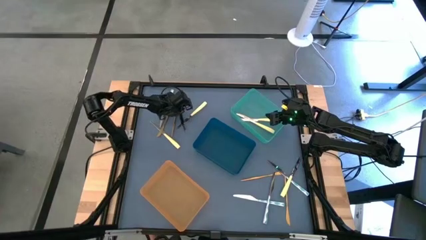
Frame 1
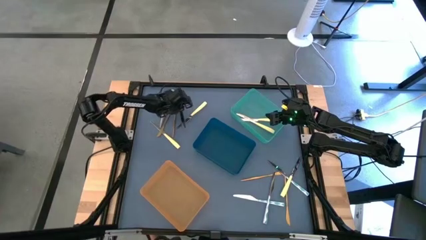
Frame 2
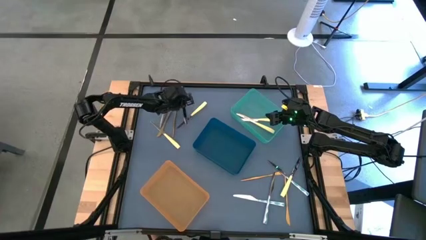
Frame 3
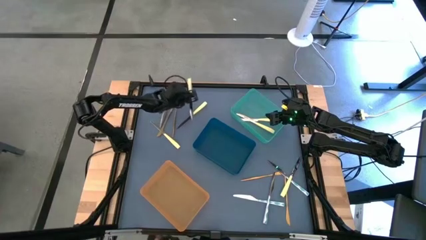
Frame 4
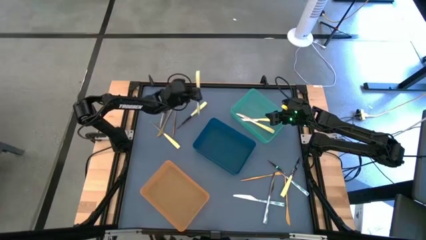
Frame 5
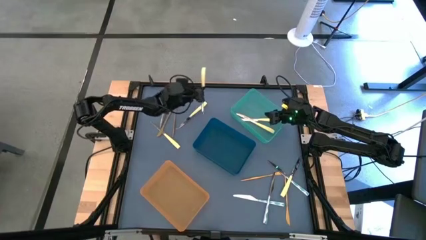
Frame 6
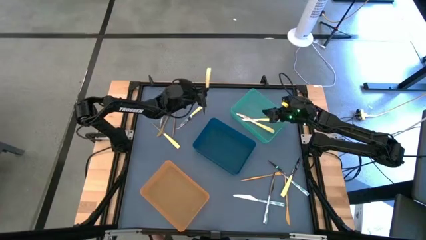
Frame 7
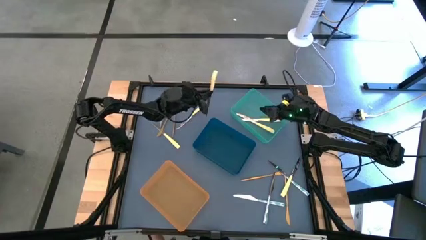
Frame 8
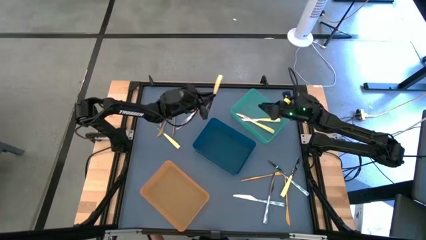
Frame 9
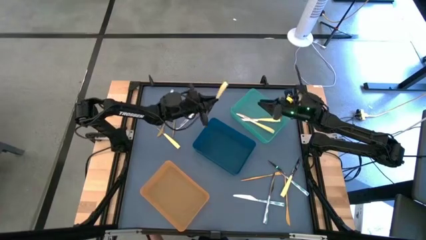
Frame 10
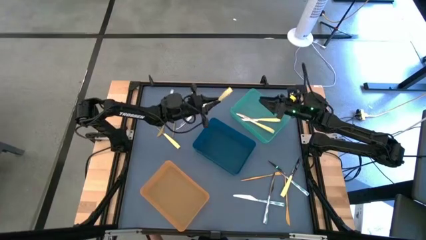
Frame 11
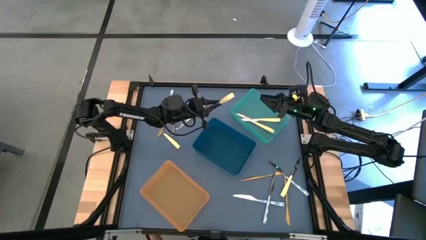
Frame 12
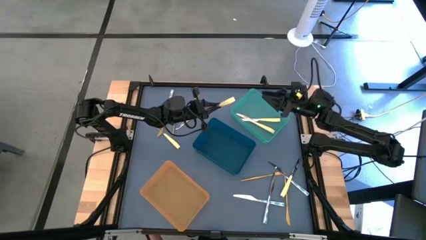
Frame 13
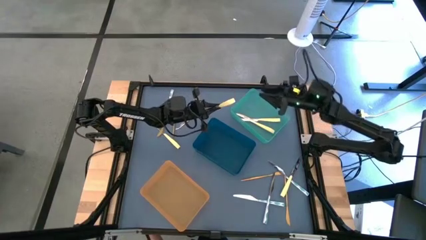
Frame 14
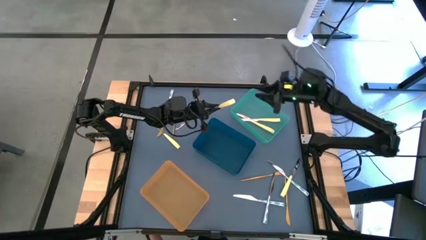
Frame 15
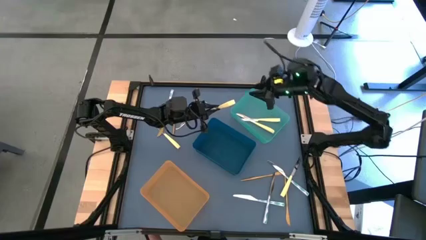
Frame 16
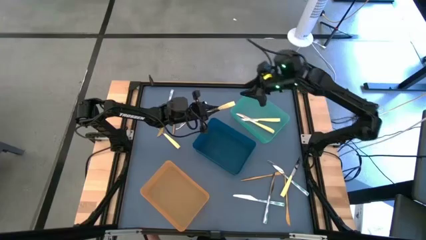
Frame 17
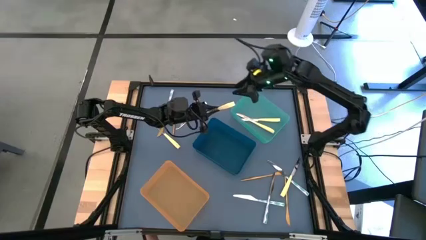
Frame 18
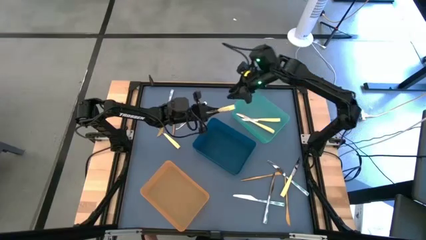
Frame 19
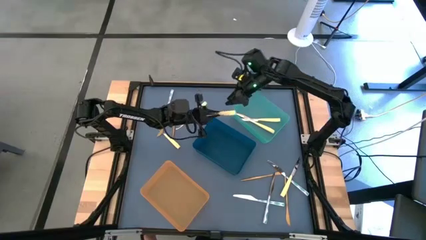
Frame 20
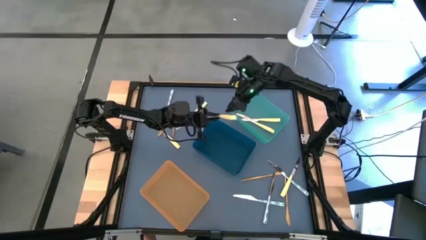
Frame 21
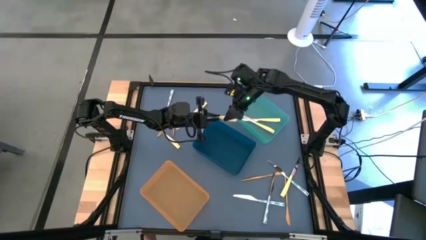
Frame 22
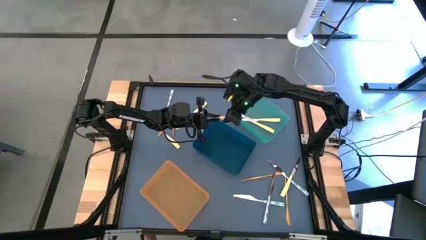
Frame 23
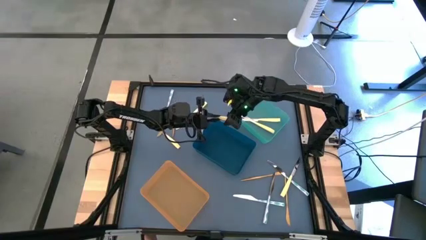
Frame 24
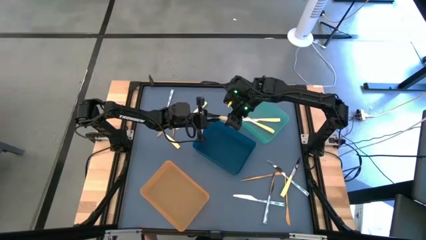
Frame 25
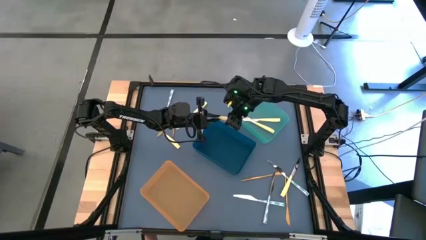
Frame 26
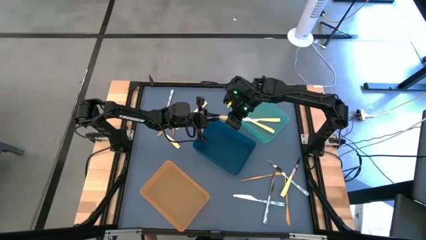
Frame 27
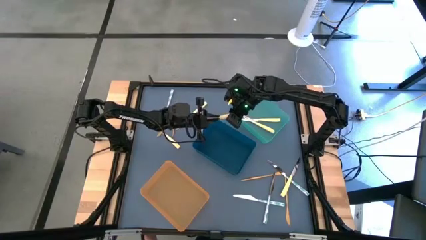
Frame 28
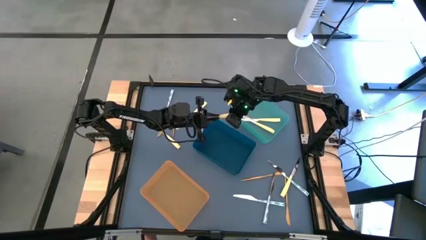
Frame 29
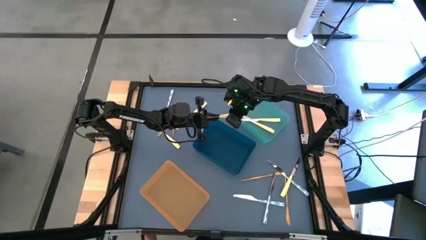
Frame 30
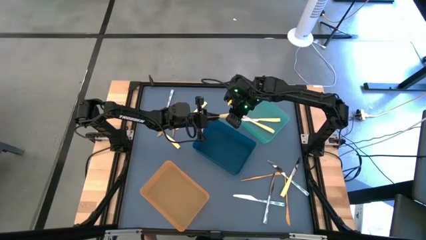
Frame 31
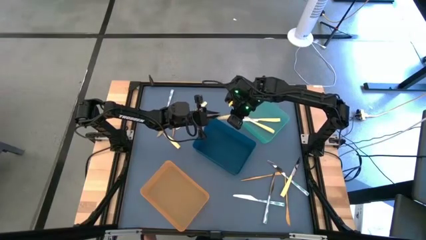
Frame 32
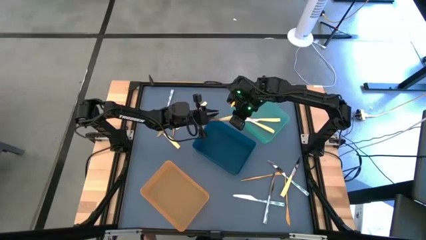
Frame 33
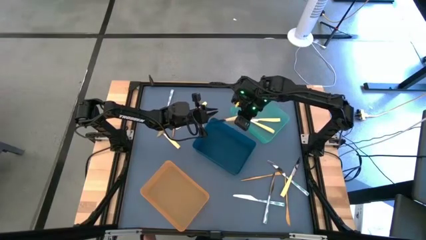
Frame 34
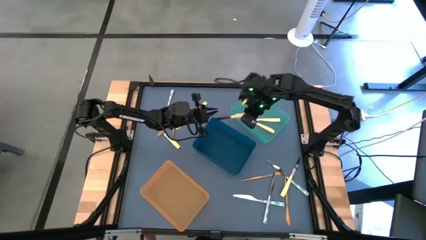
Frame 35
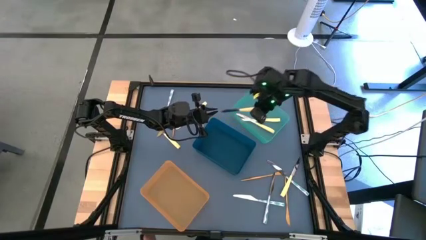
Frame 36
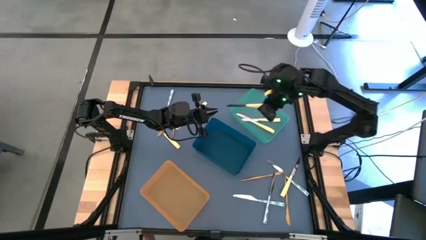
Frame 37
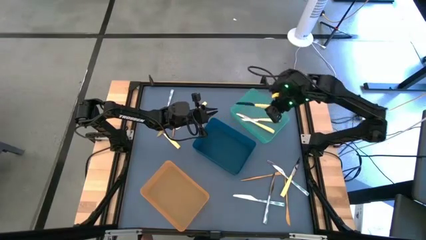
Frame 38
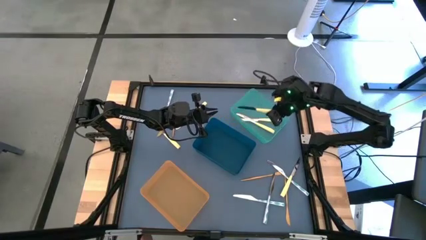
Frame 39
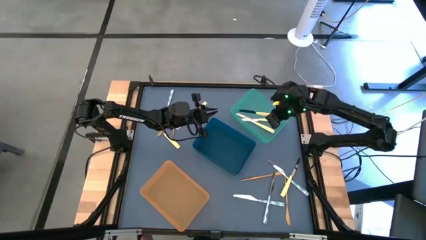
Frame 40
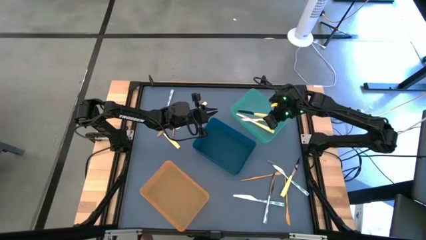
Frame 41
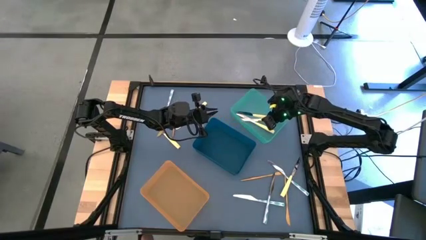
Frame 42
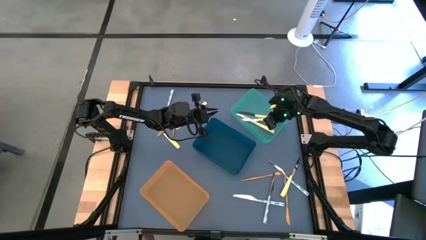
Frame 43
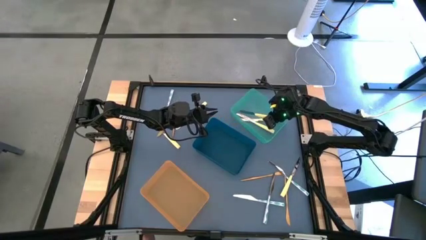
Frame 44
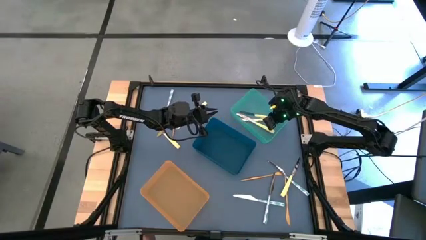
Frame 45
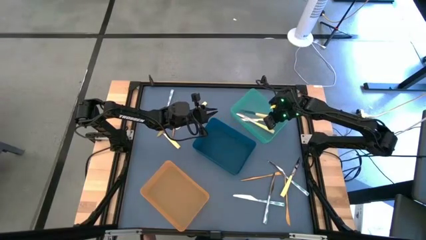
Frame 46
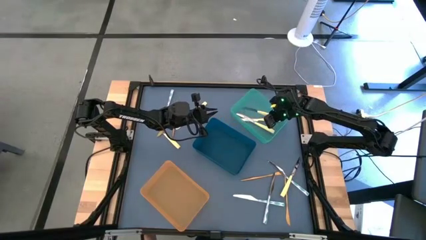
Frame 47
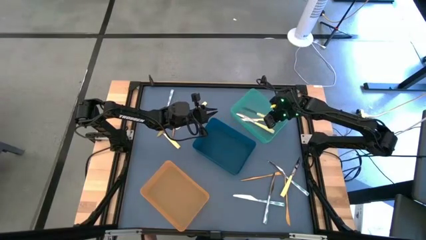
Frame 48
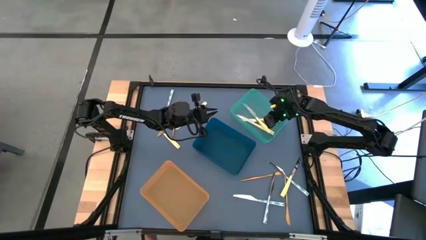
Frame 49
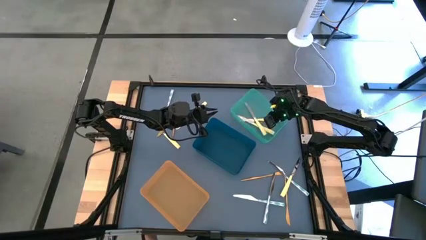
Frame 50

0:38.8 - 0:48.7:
Task: Sort silverware by color (type)
Put the right yellow knife into the light blue bin

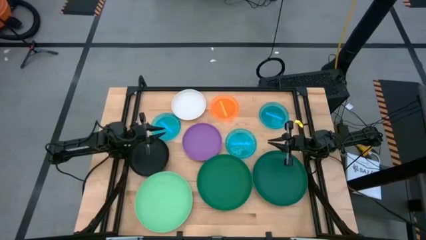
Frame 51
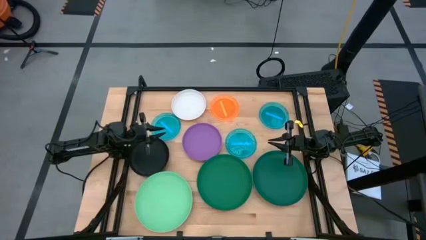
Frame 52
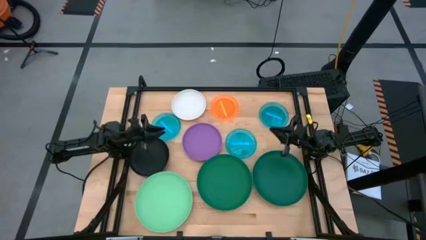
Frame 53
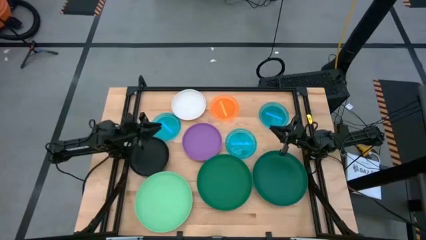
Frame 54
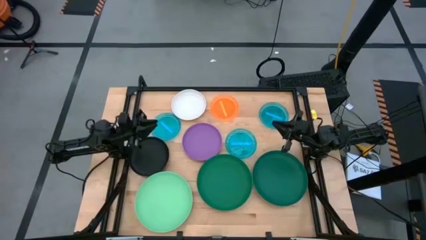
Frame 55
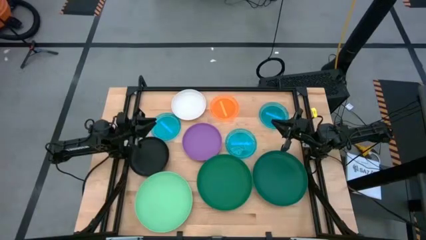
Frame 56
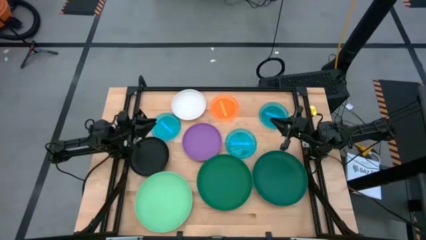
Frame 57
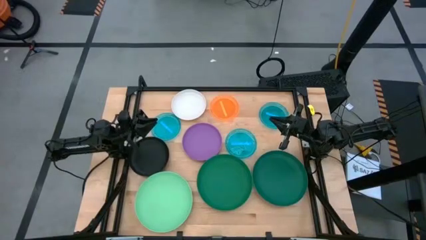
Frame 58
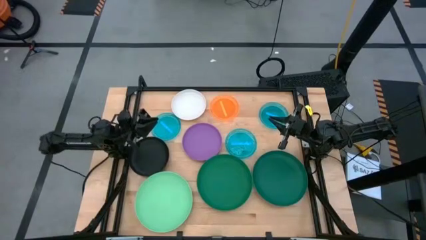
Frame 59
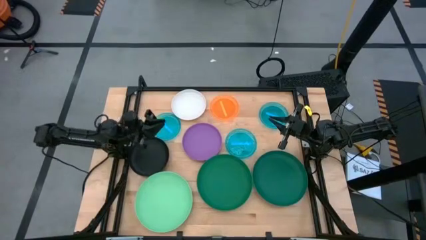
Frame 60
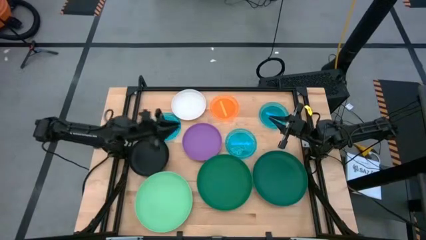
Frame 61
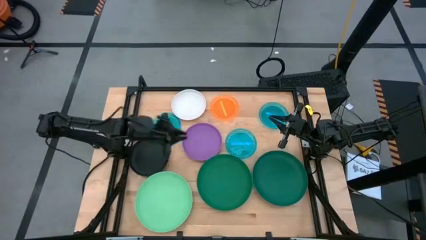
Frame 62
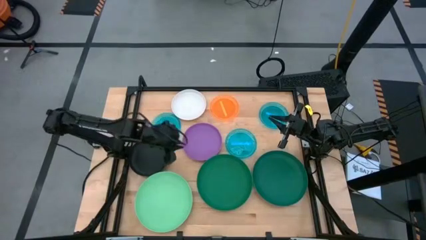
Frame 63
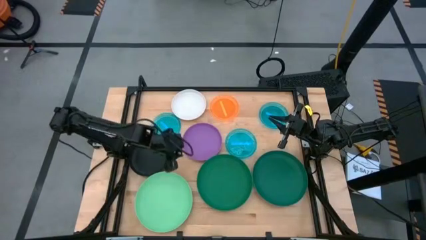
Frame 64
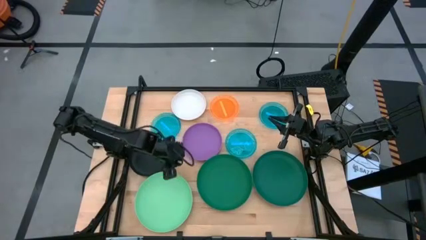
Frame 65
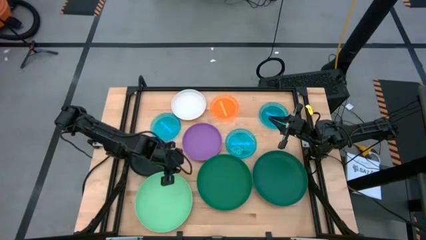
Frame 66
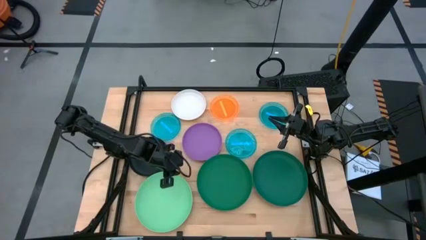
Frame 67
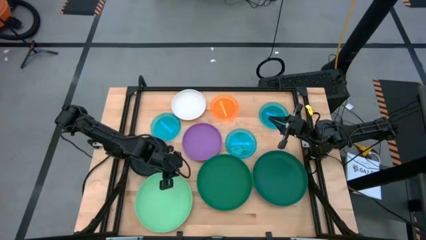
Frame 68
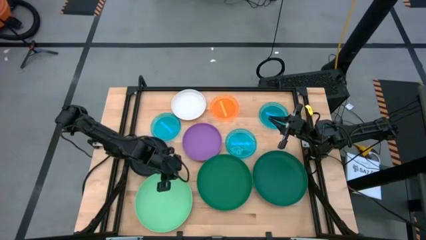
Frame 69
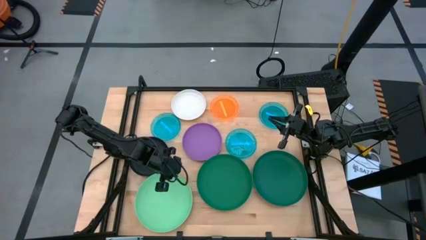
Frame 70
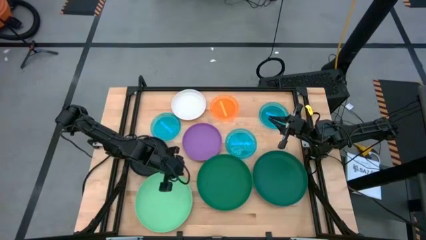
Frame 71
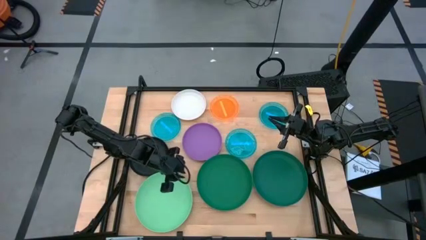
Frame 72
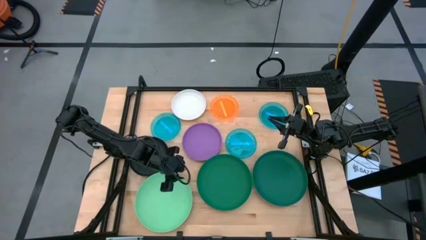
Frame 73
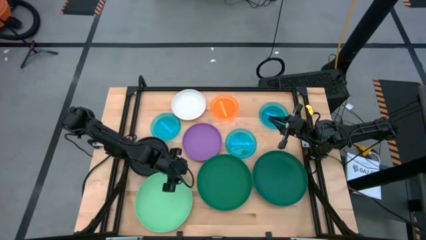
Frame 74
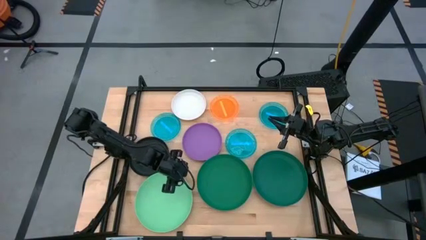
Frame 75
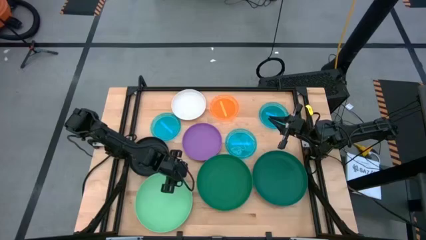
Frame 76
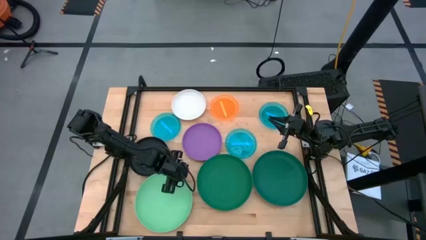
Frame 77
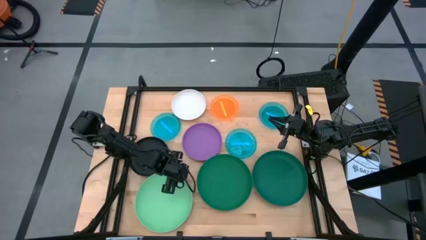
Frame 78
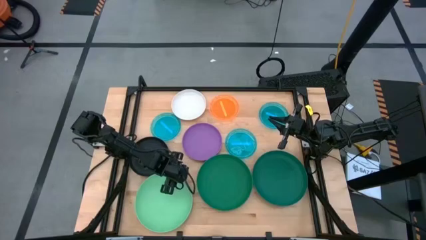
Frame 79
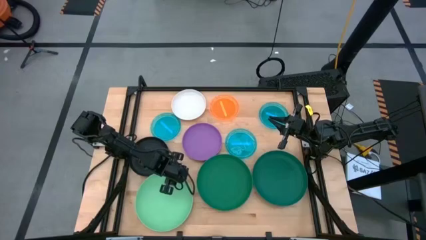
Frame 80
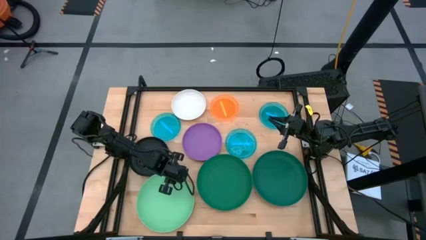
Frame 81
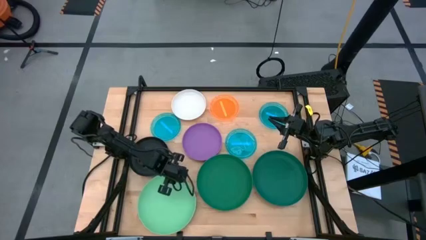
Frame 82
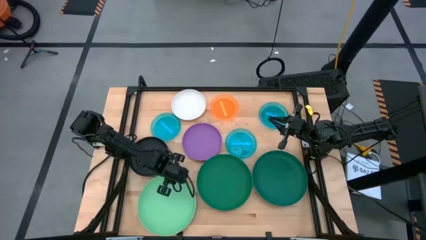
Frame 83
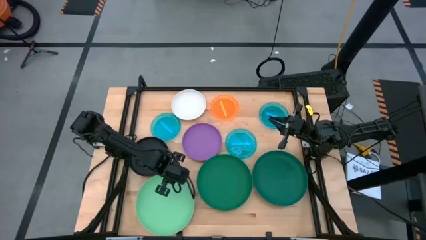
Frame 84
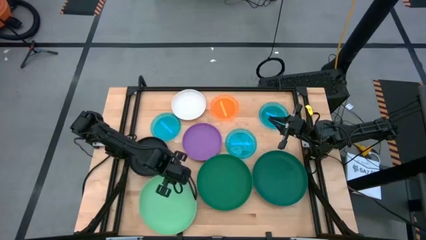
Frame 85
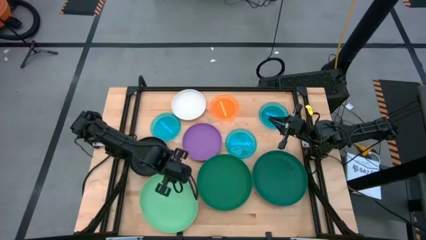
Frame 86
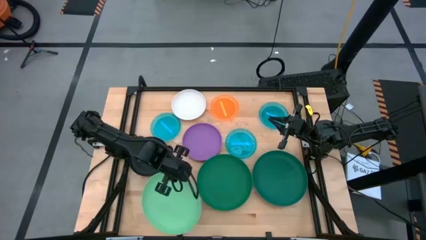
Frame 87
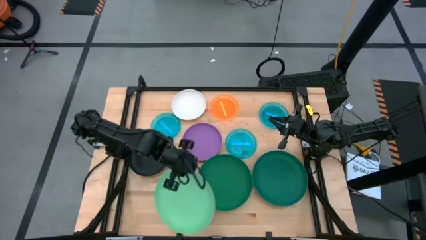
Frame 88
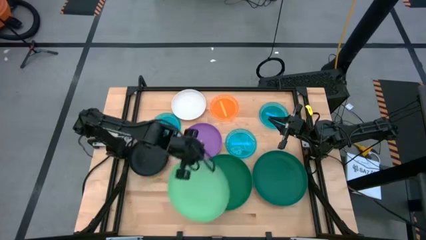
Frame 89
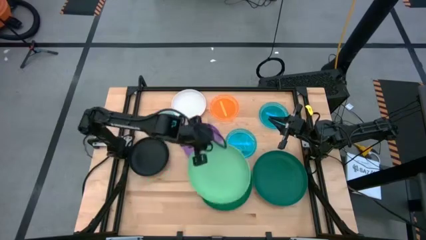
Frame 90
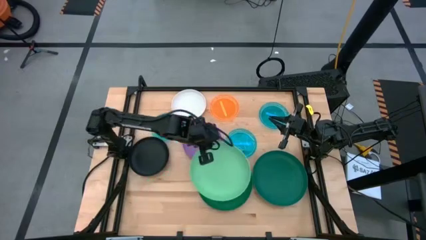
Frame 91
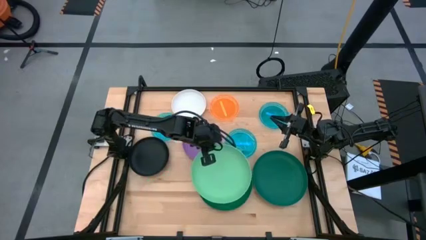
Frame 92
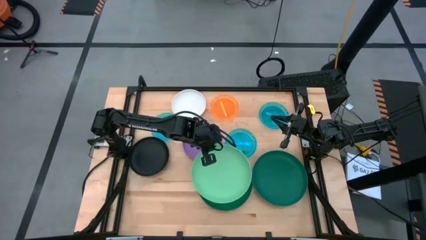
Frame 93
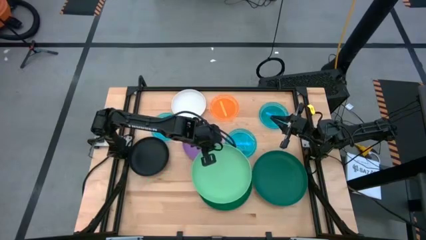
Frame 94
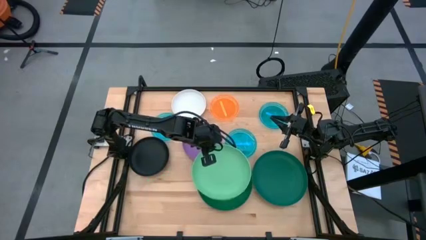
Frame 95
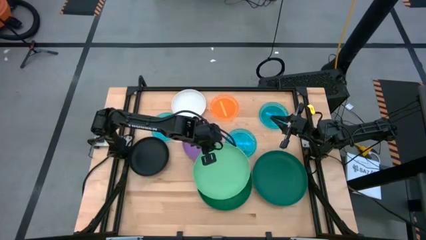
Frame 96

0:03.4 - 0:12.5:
Task: Stack plastic plates
Stack the light green plate on top of the green plate
